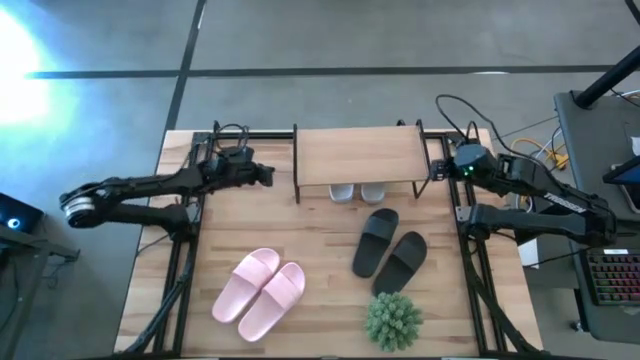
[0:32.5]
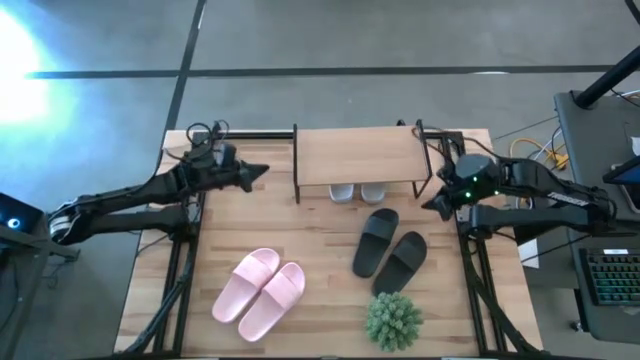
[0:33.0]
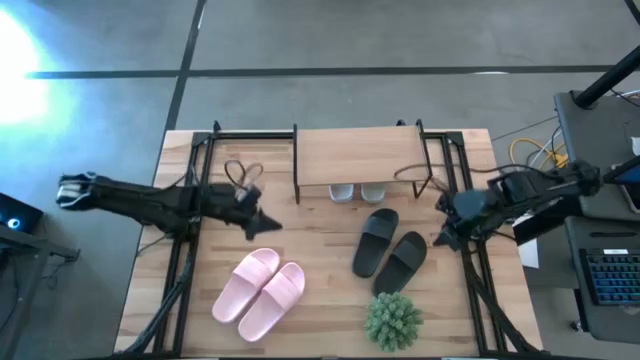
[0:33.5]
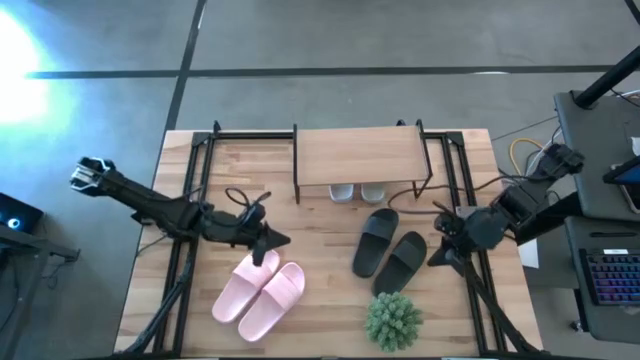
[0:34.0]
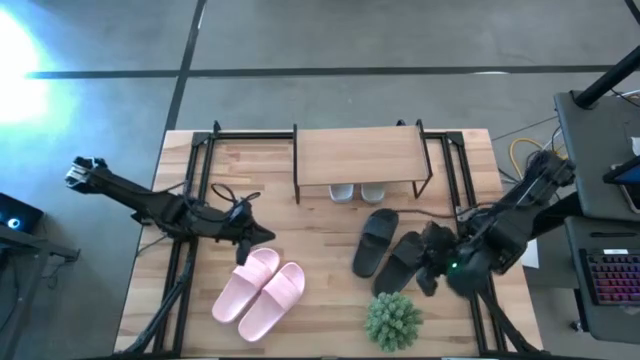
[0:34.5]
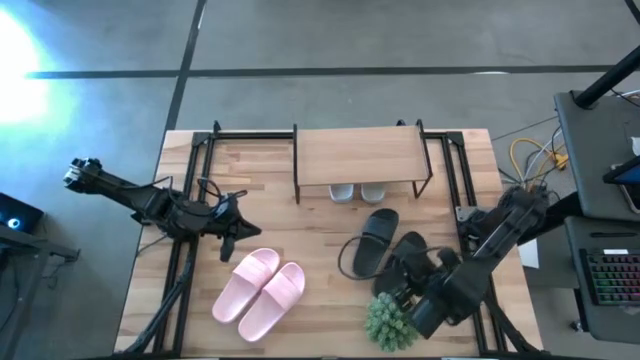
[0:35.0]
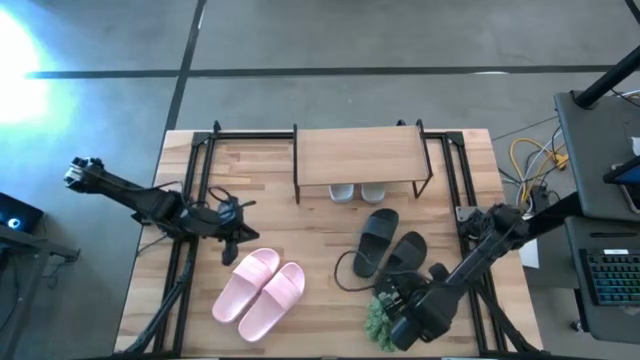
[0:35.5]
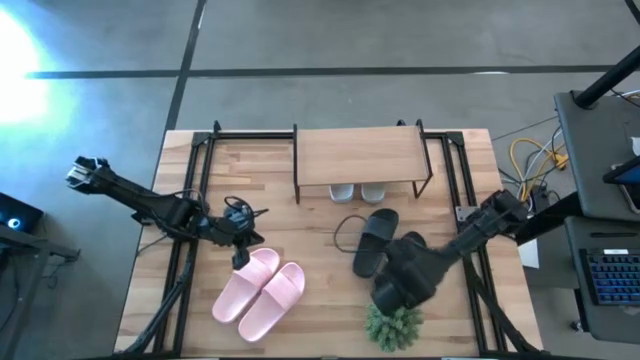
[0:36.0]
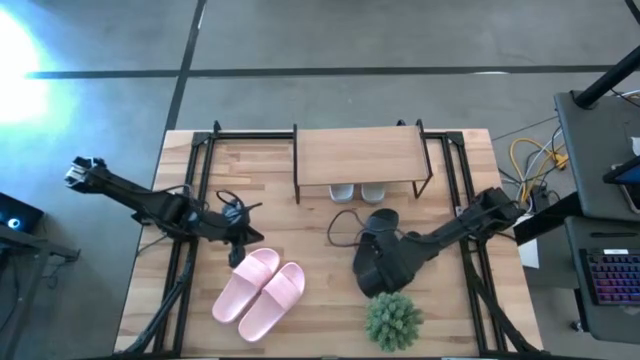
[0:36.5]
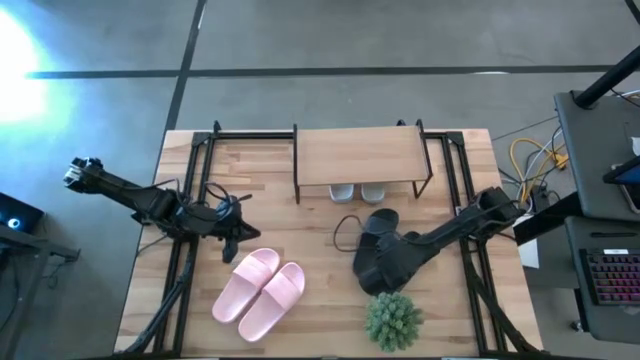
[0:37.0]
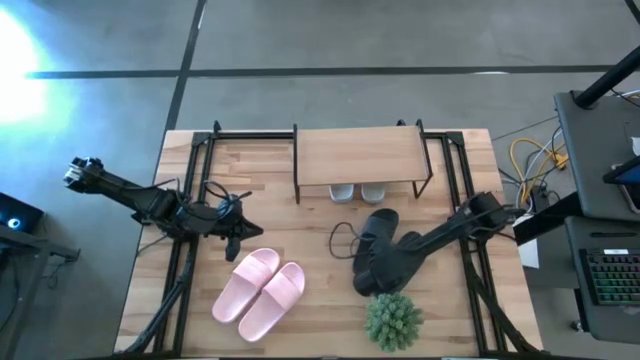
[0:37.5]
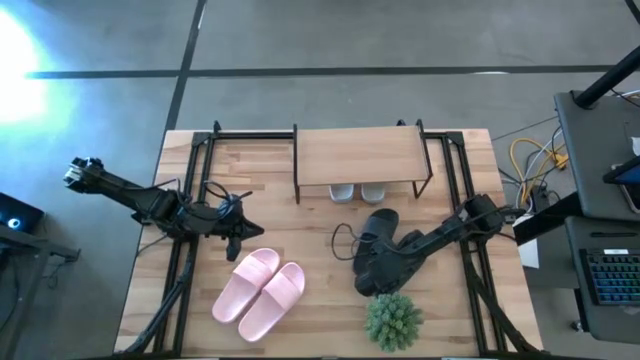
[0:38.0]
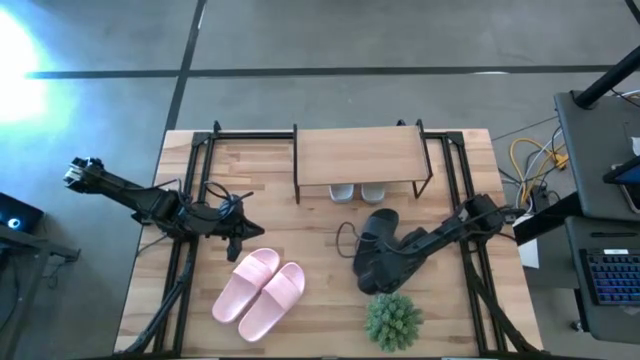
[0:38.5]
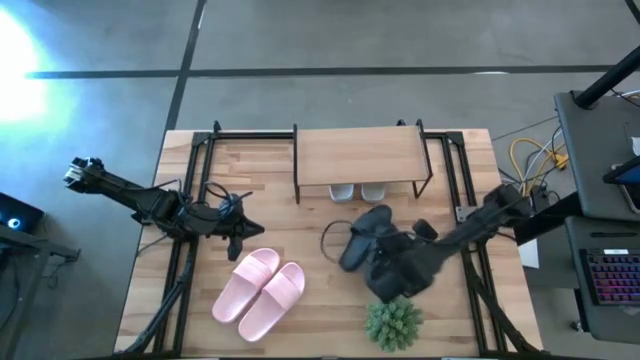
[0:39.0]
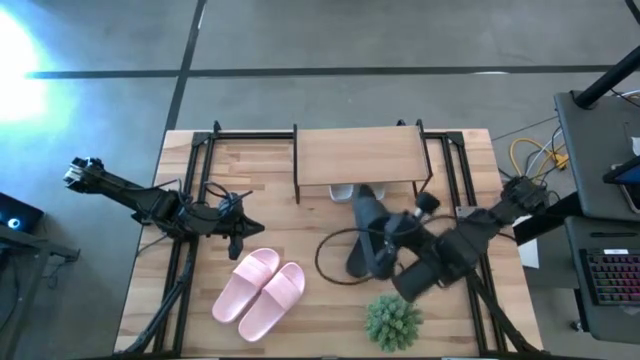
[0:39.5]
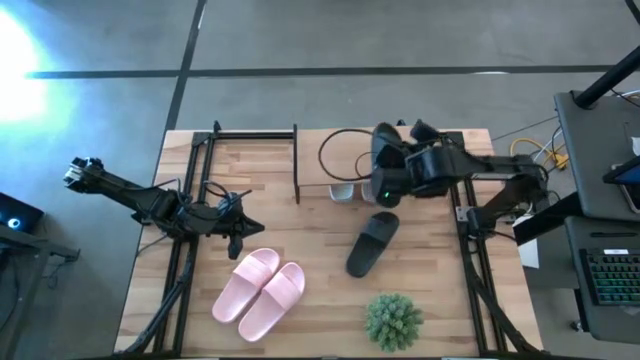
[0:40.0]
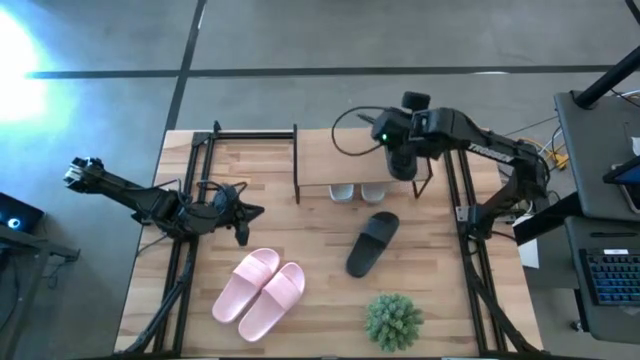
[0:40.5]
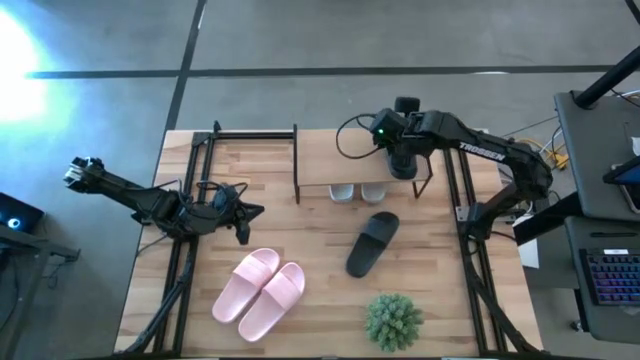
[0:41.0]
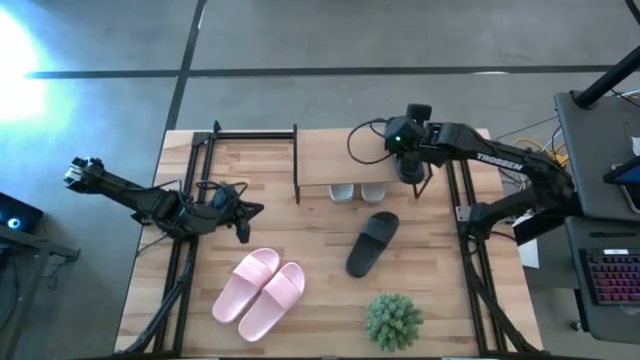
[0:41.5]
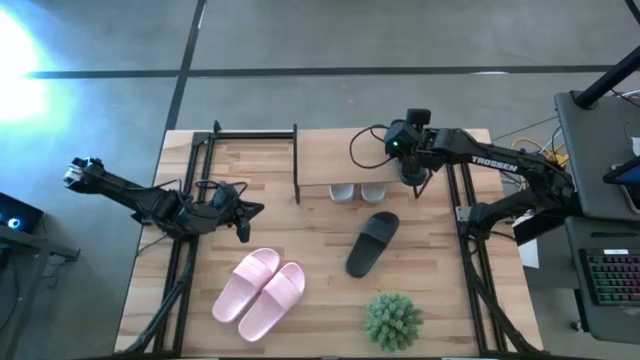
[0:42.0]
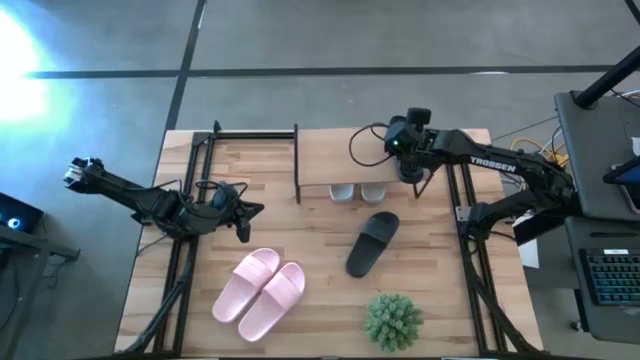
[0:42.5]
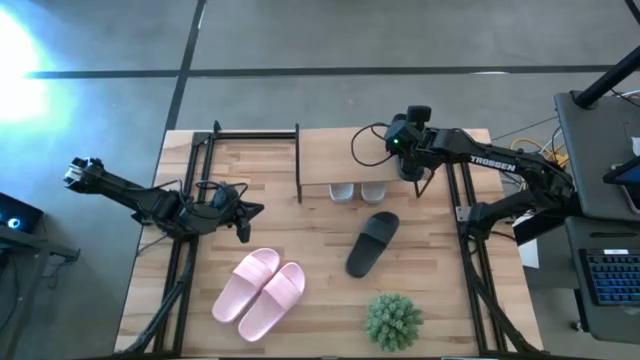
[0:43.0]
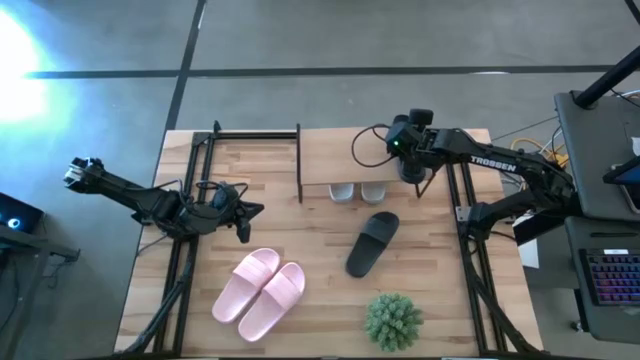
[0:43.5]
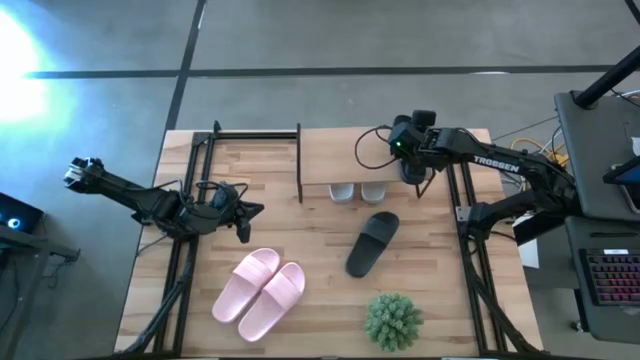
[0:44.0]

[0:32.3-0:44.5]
Task: Pick and place slides into the shelf
Put the right black slides on the shelf

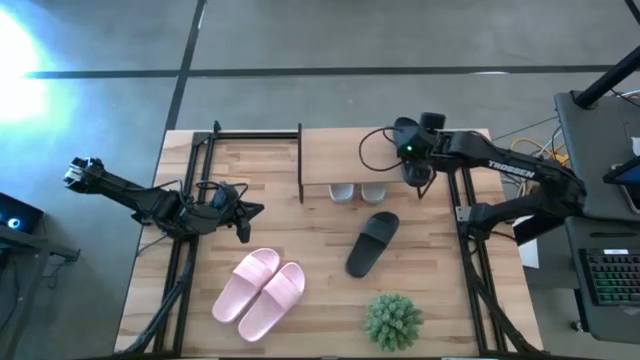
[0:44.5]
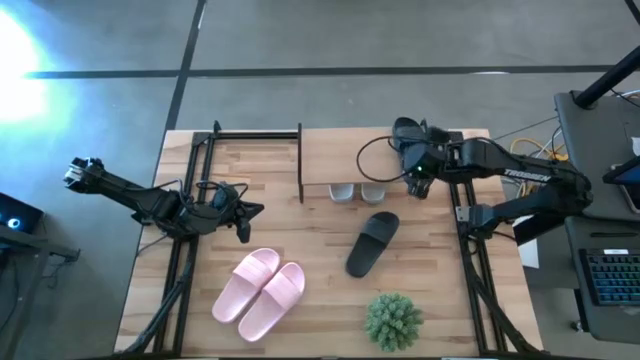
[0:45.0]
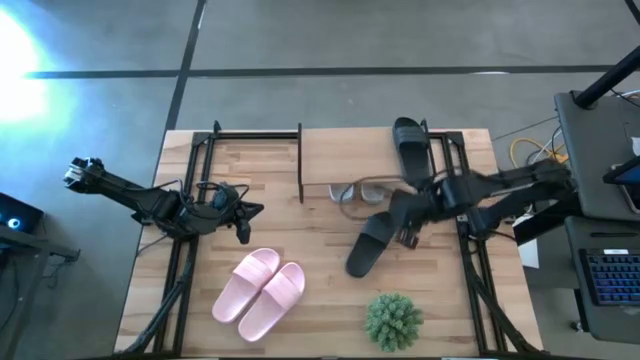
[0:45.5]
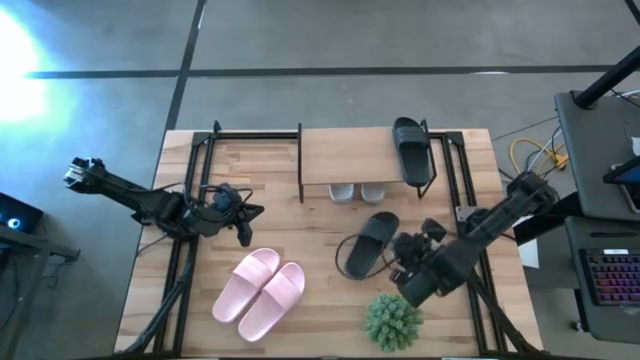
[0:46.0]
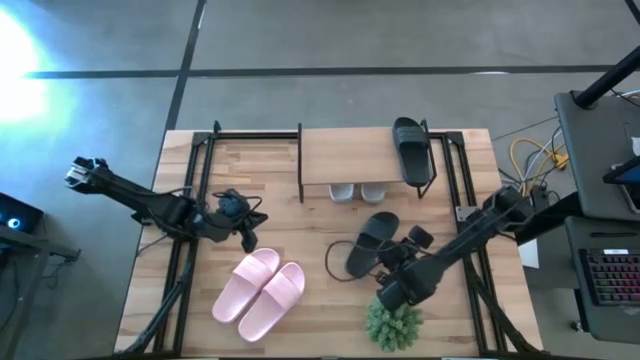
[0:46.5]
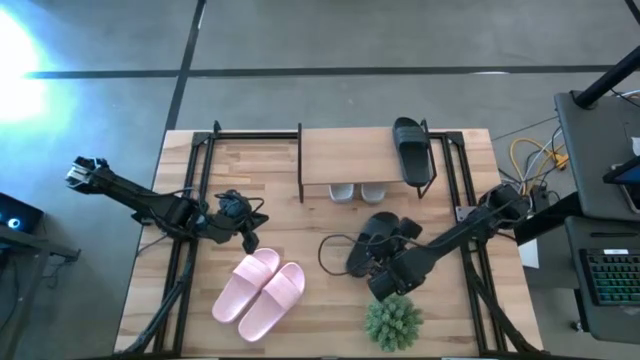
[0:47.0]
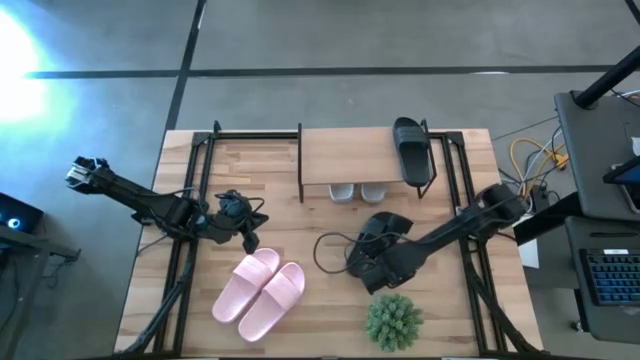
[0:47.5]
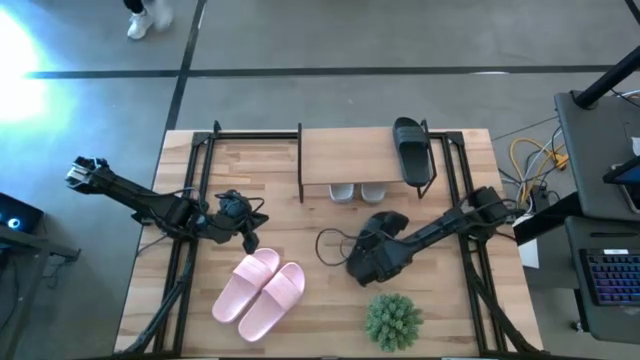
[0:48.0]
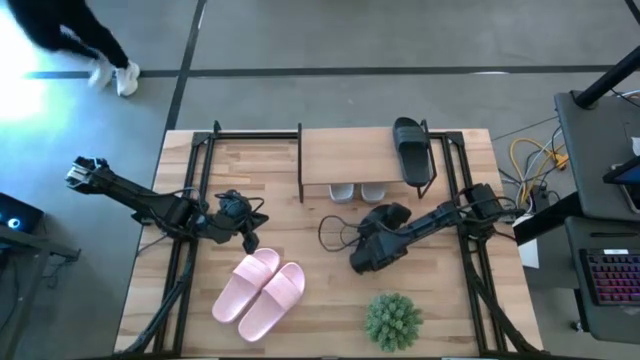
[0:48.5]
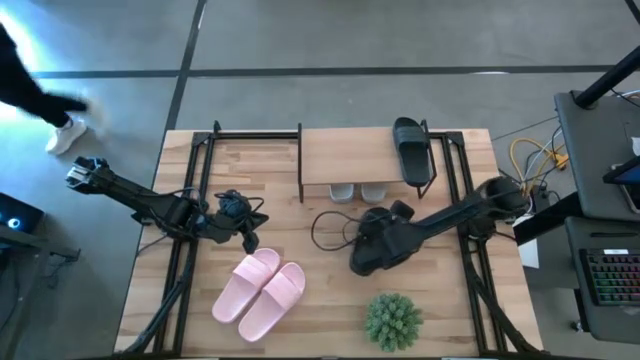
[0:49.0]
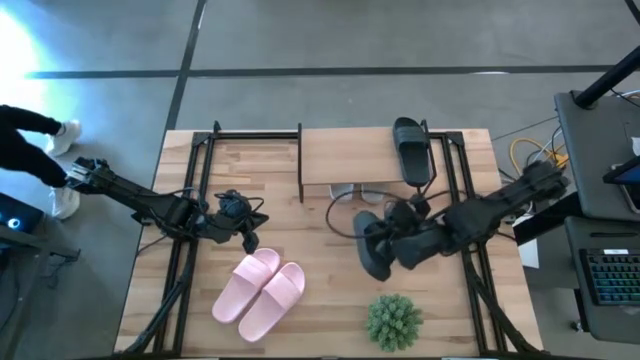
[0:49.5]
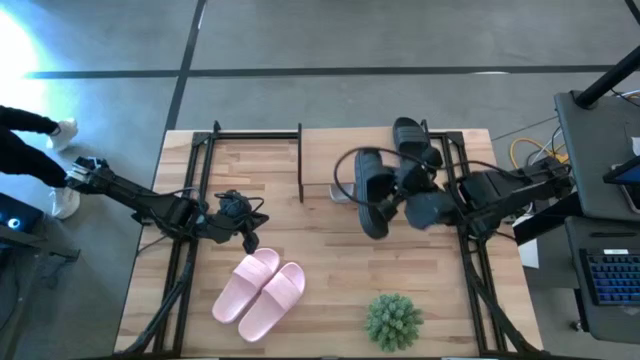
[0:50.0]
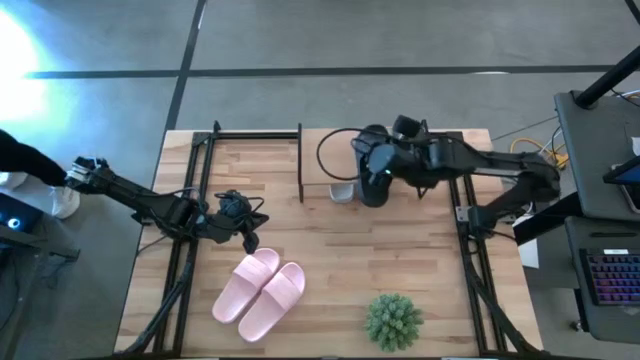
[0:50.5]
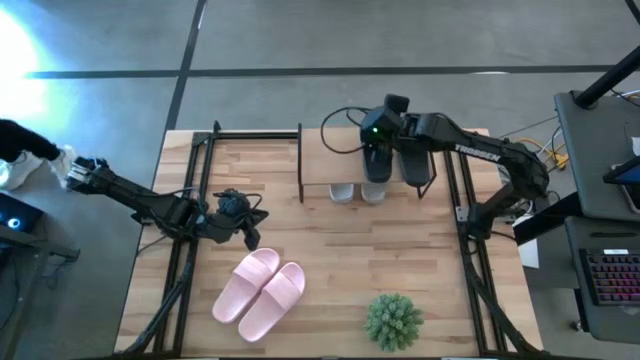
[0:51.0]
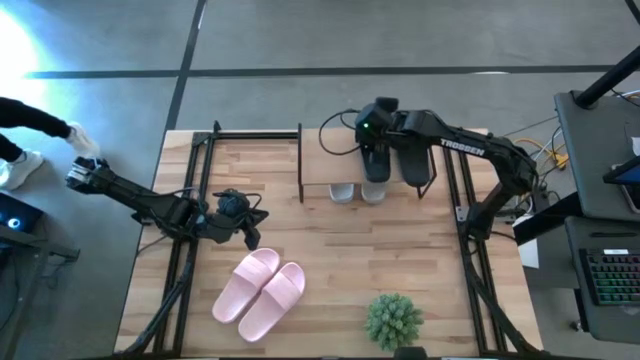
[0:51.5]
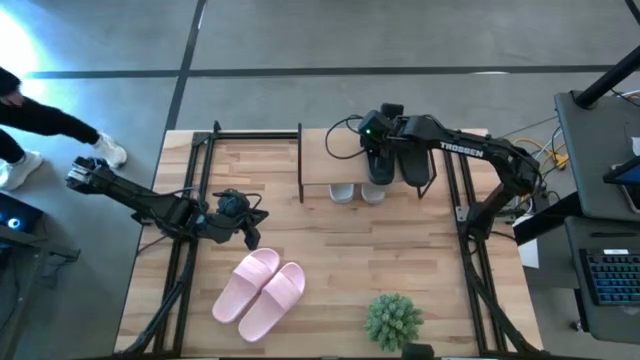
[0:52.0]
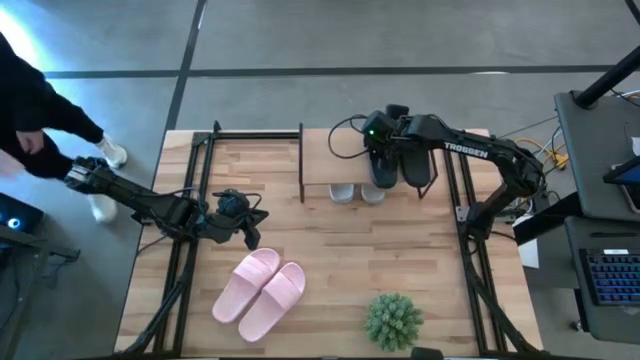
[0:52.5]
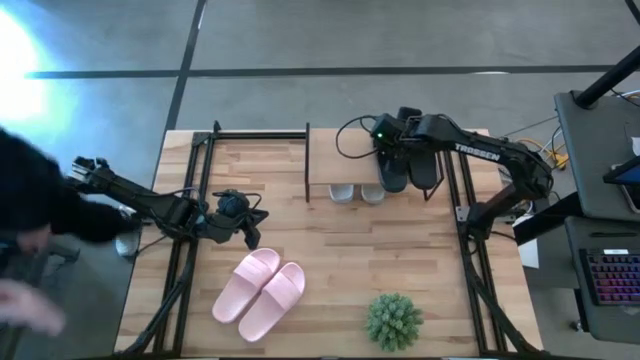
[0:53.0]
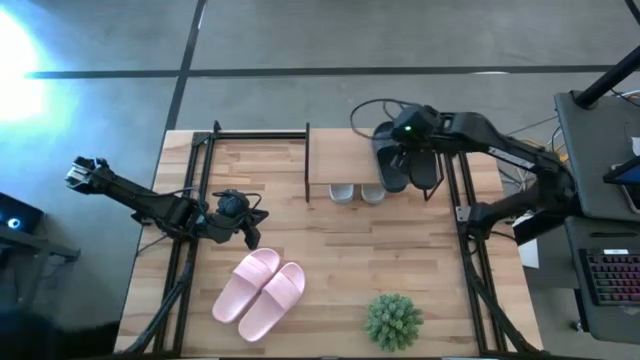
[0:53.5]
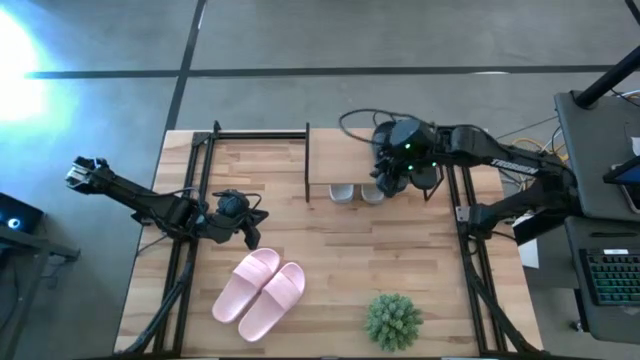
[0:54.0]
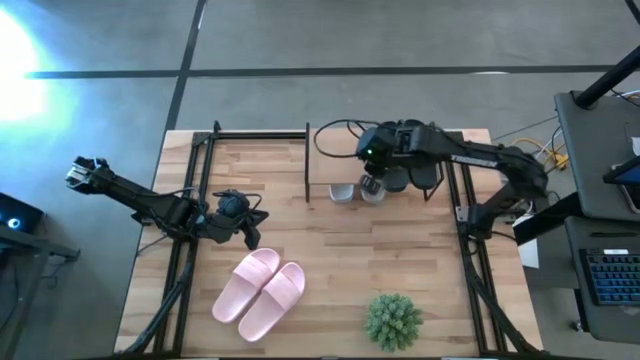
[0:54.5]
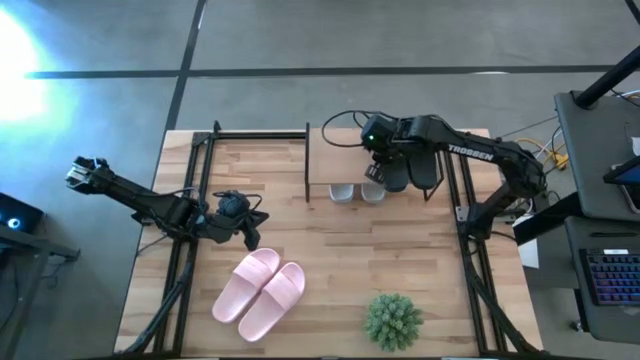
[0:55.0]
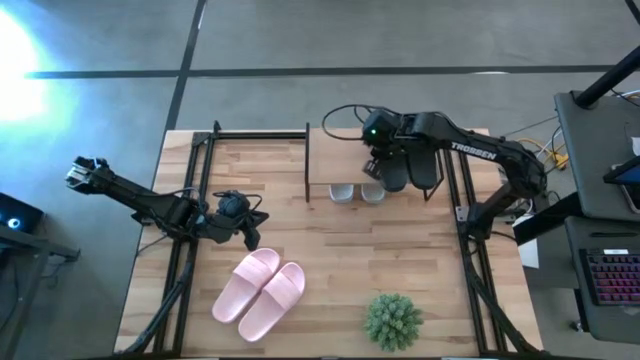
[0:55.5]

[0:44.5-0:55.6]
Put the black slides on the shelf
